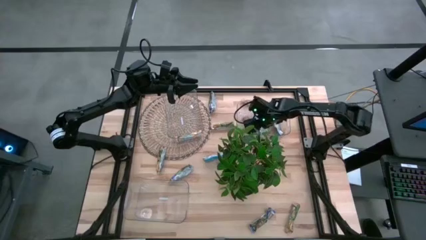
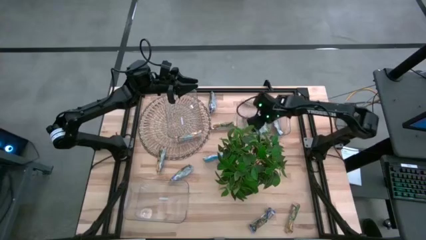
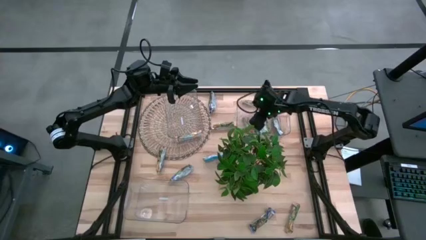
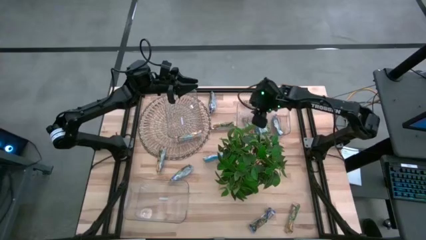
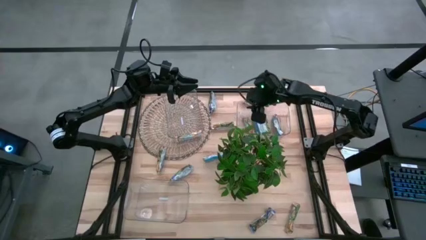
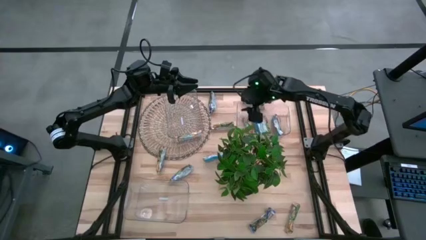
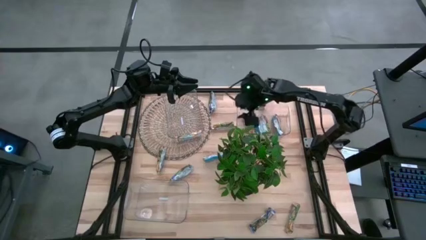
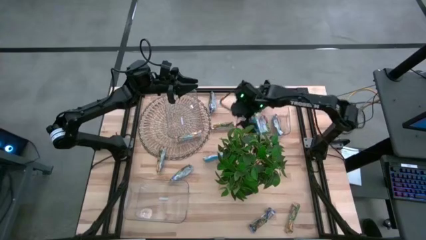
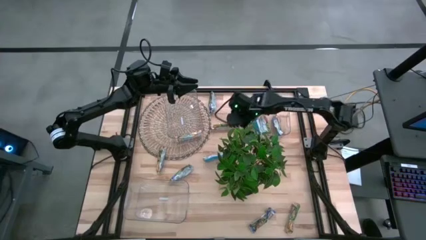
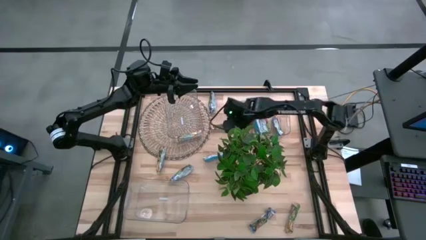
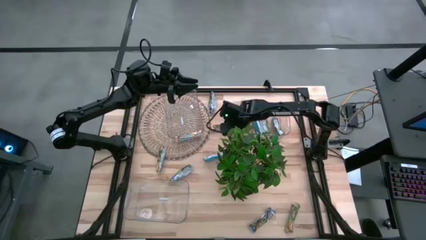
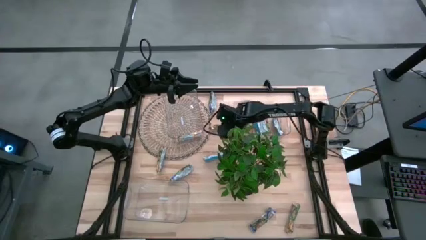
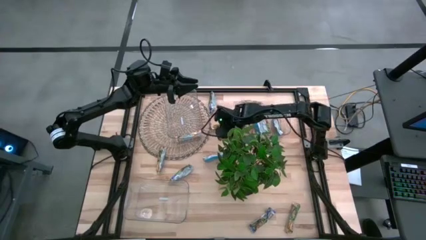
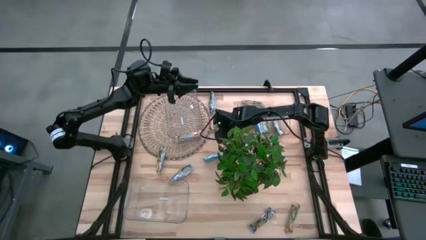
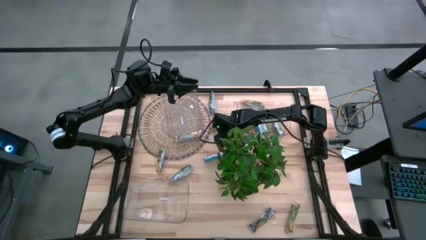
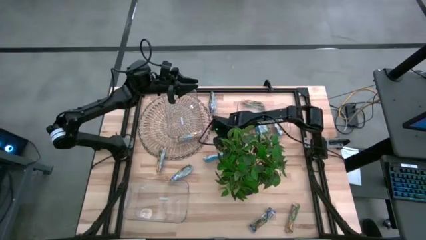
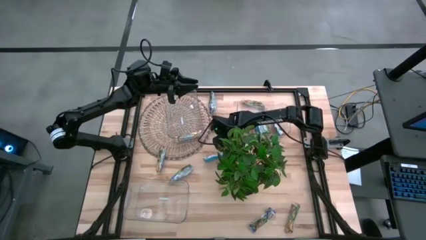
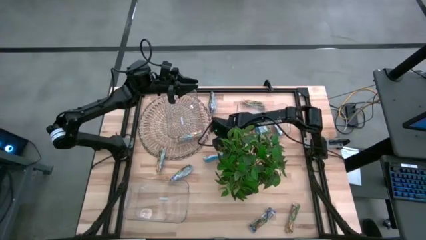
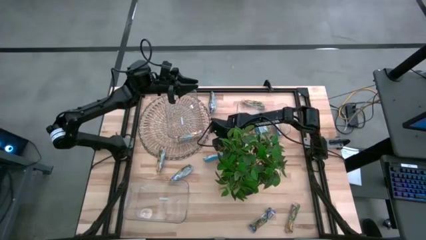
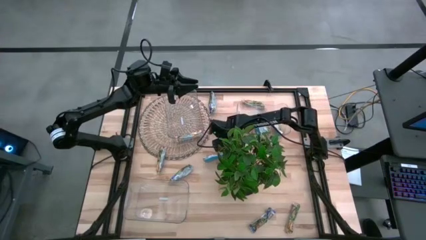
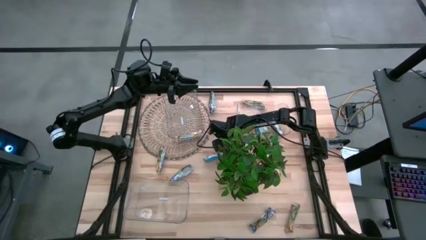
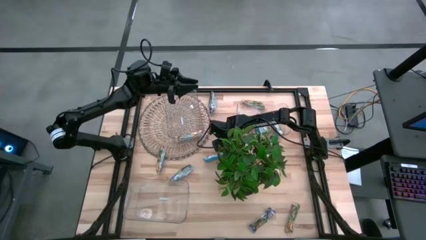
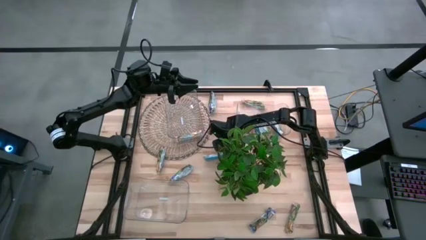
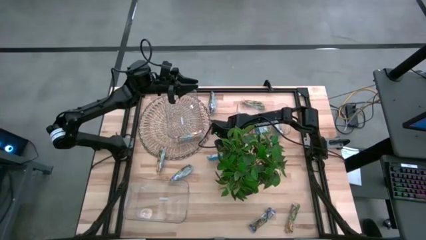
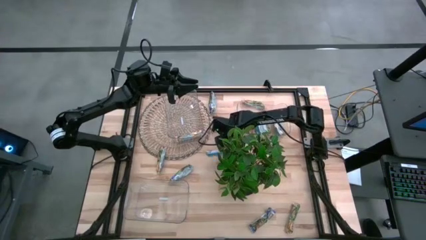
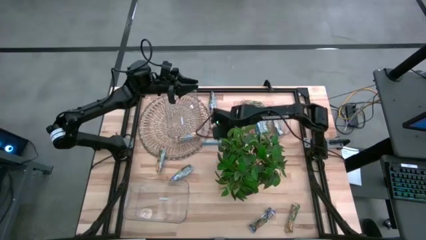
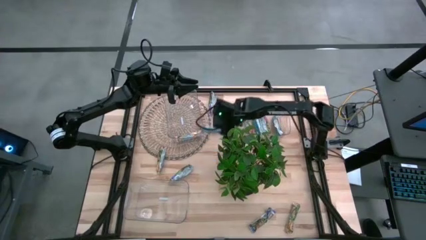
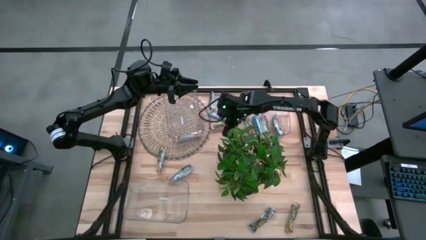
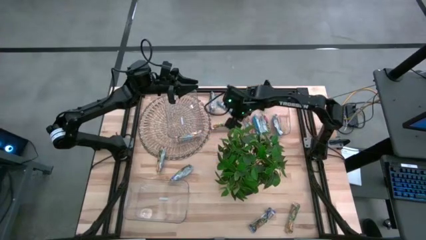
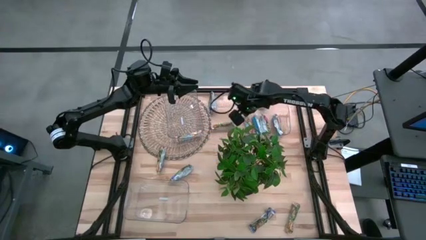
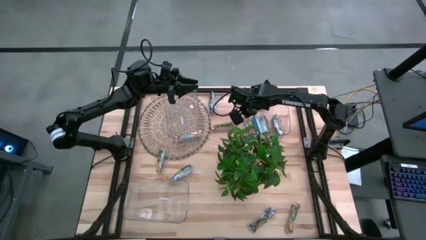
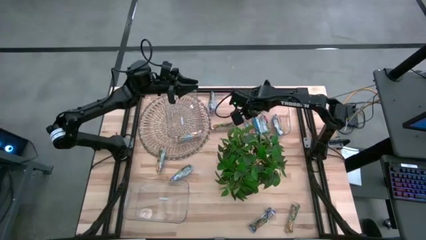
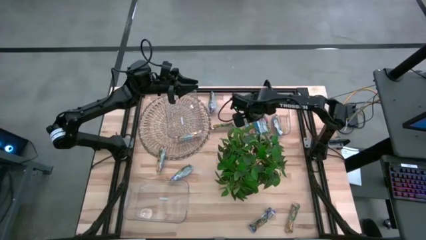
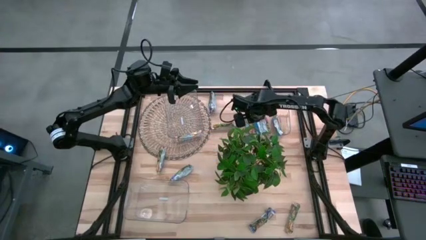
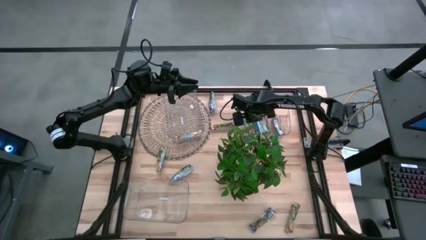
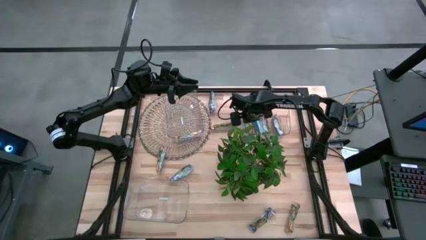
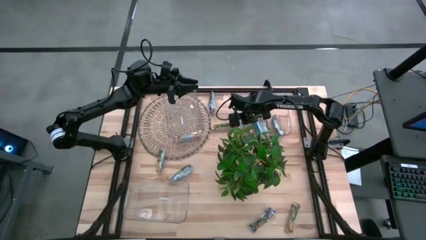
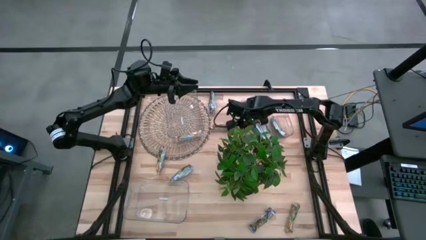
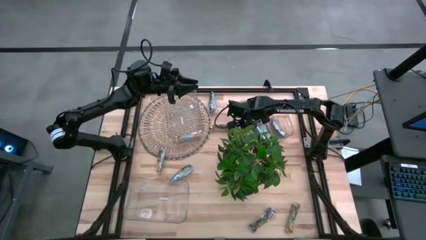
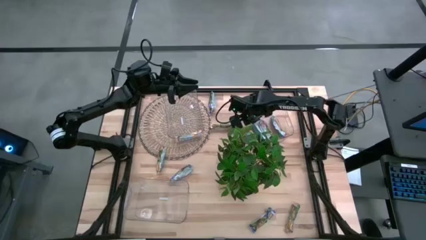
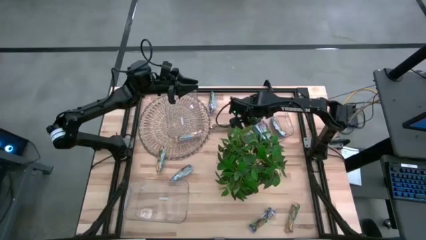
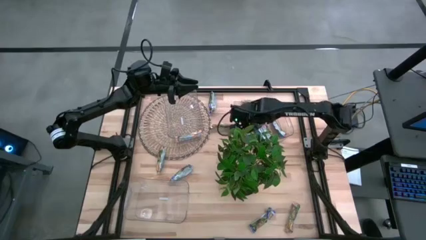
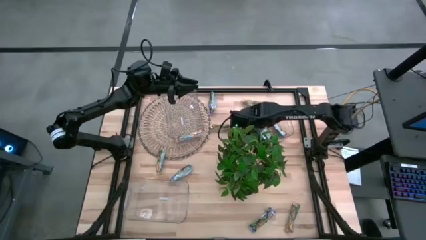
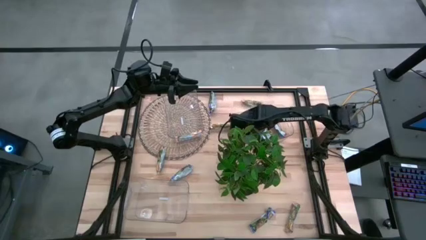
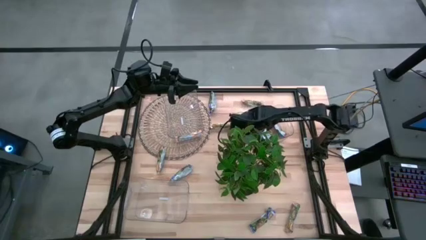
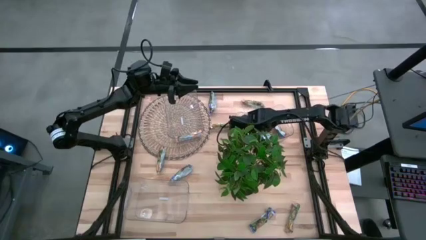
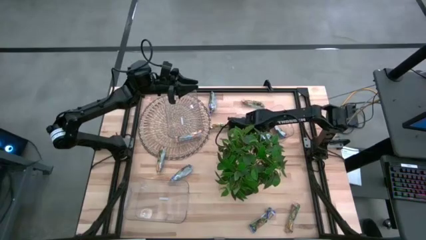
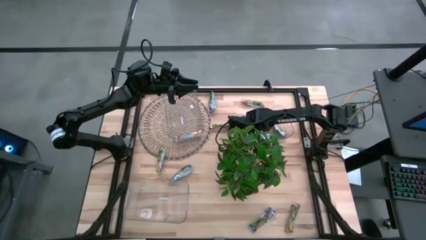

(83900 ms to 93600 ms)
Task: Pick and place Granola Bars by type
Put the red granola bar into the top right transparent bin

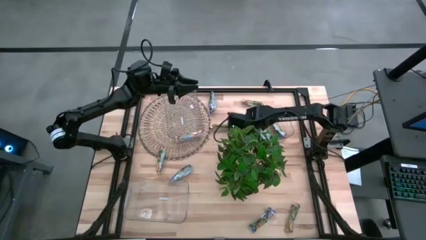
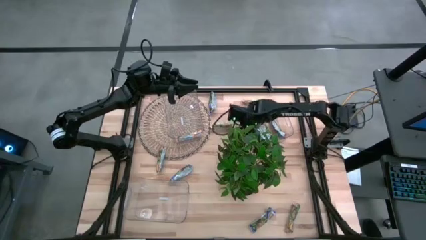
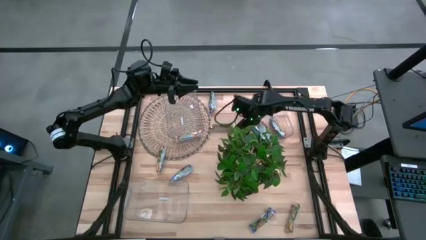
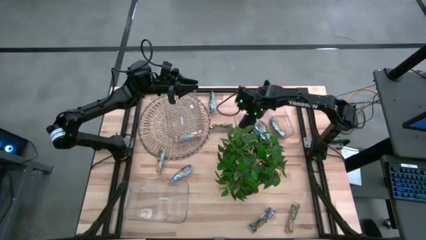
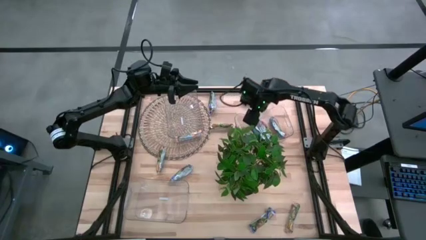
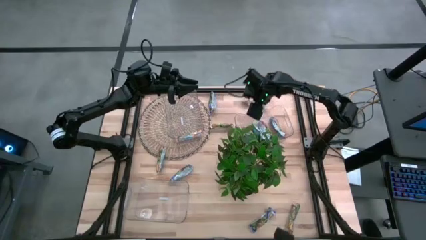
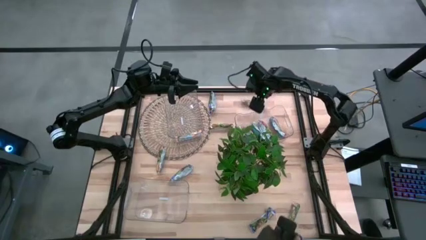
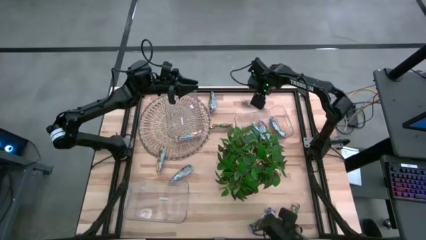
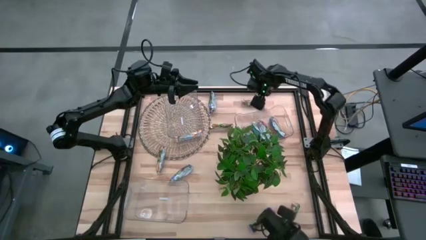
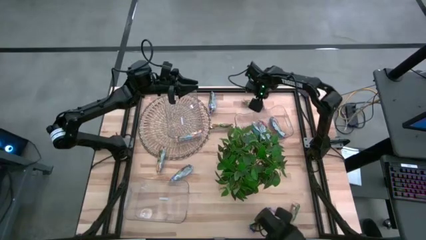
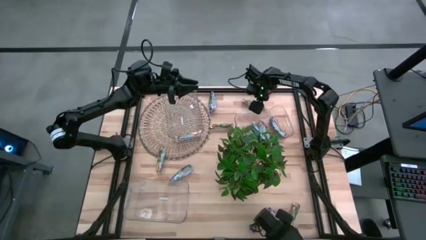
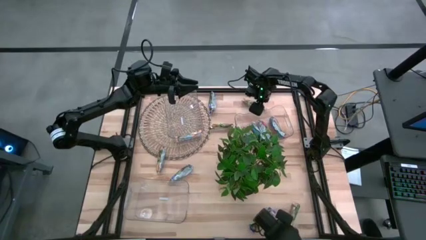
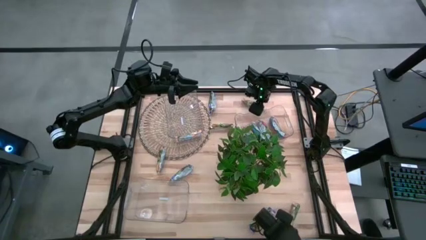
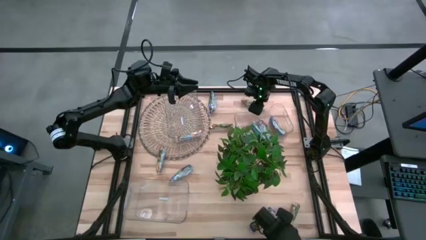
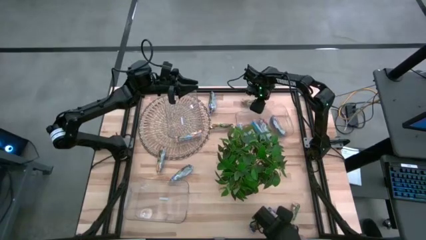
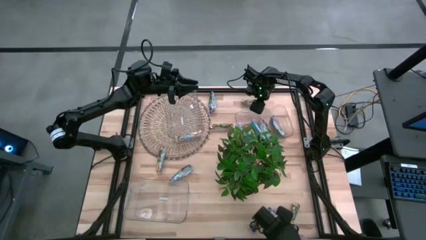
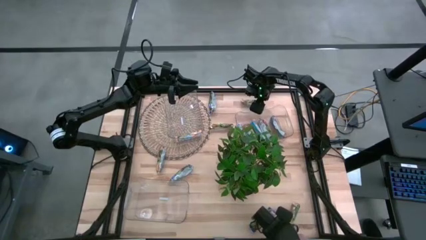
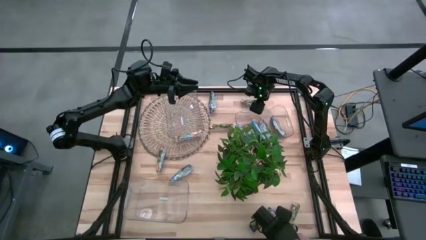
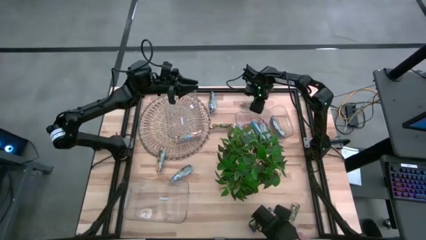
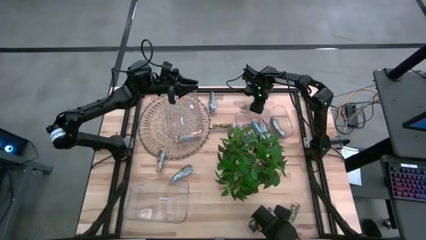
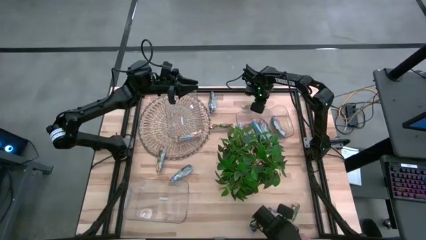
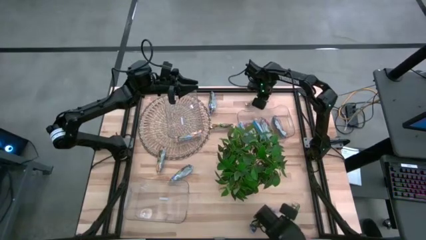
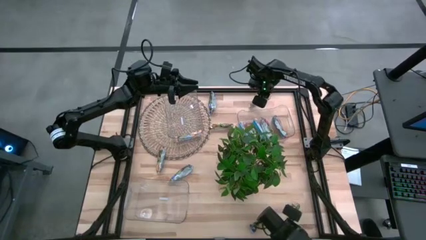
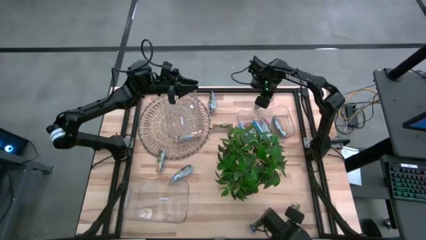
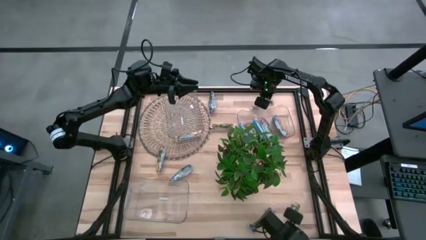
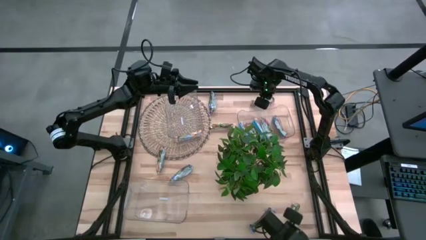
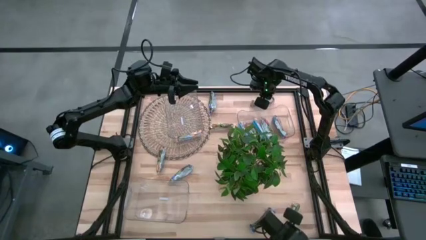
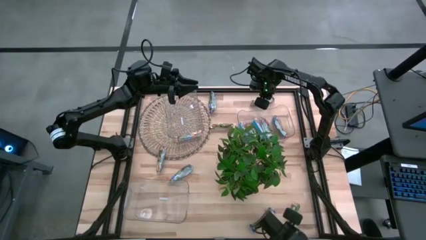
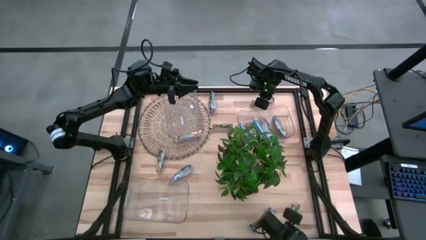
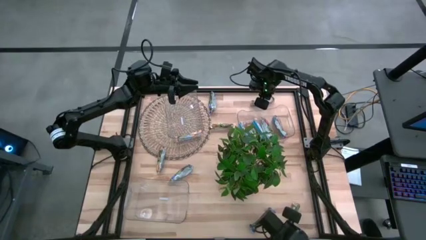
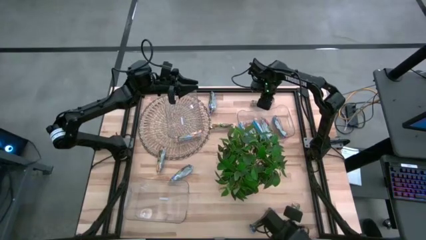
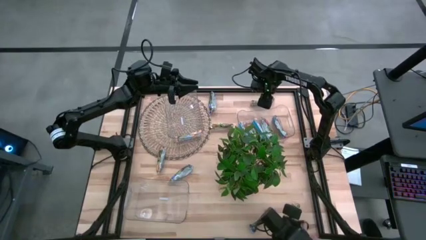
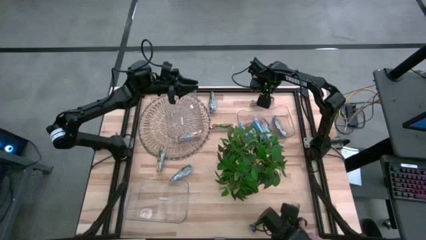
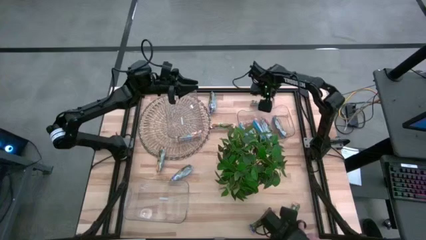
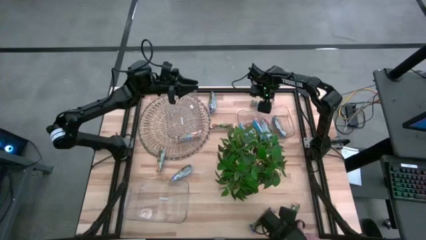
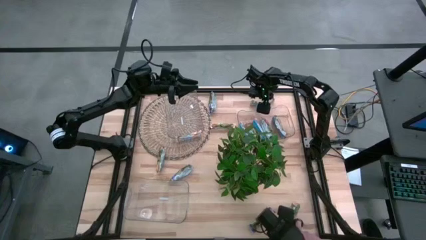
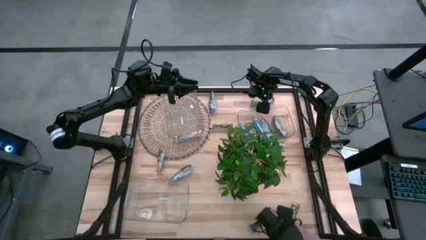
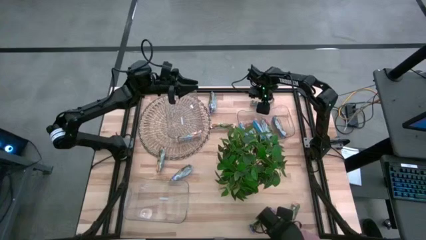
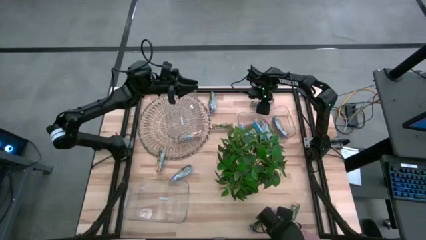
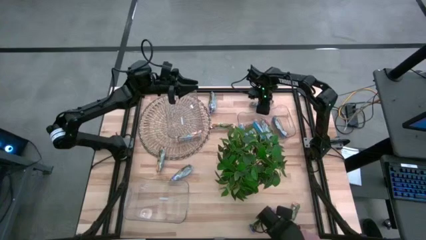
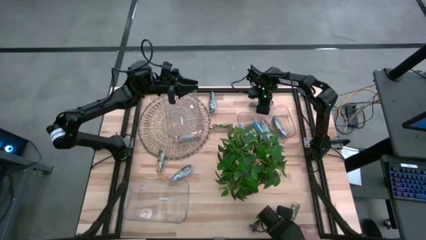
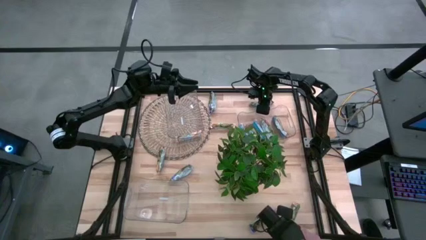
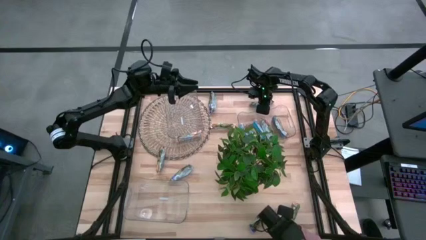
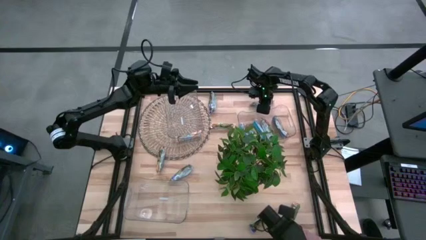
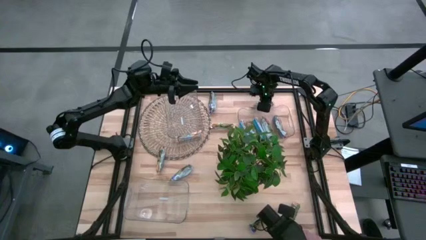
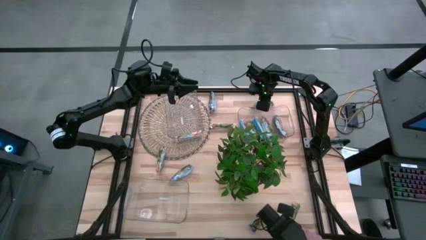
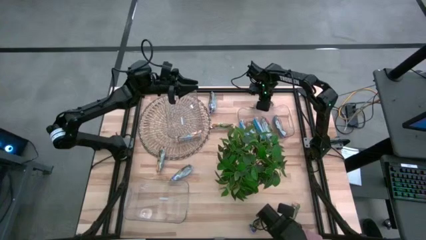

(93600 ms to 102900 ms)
Put the top right yellow granola bar into the top left transparent bin
